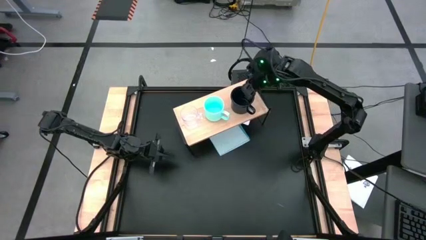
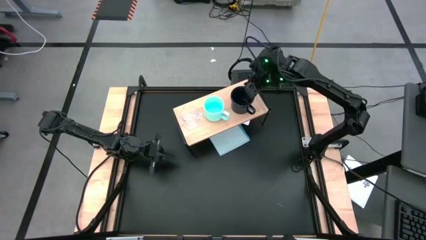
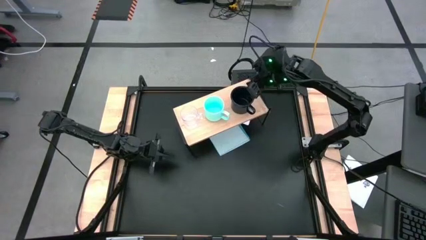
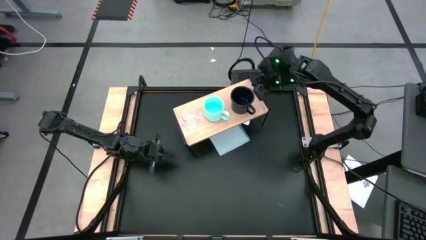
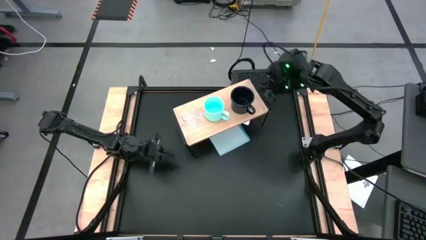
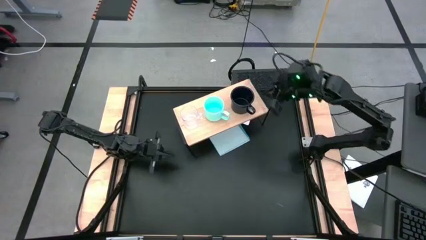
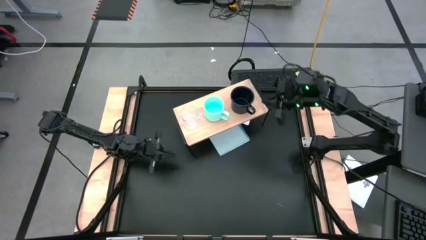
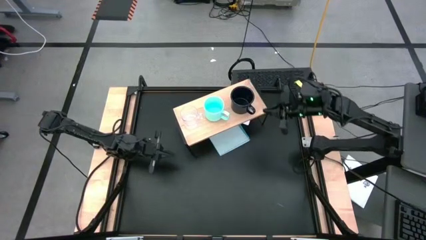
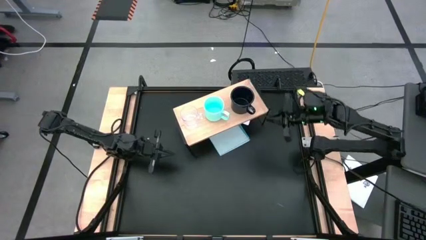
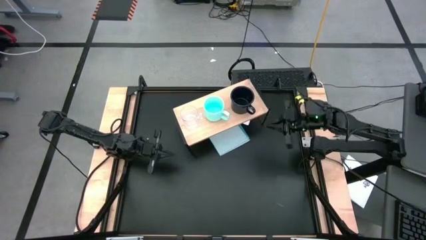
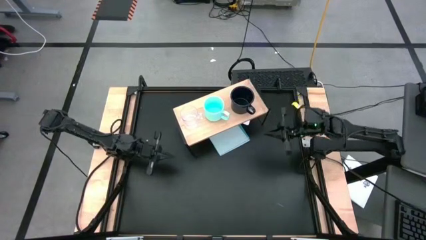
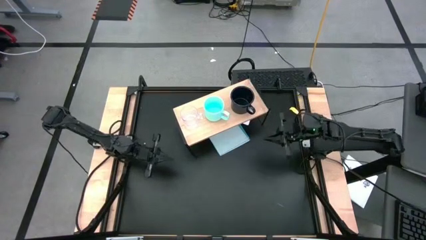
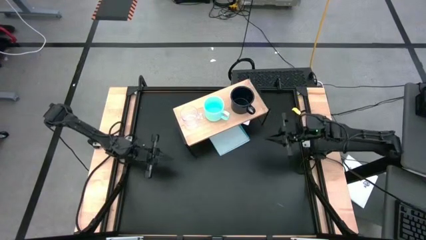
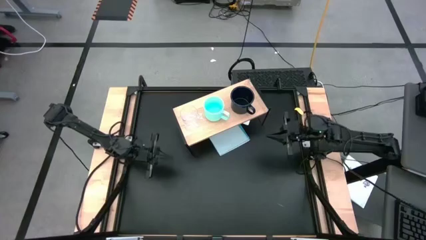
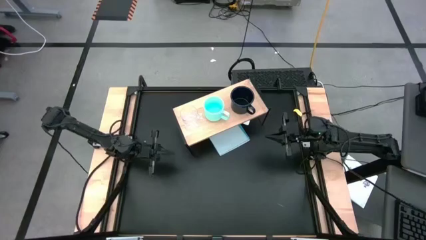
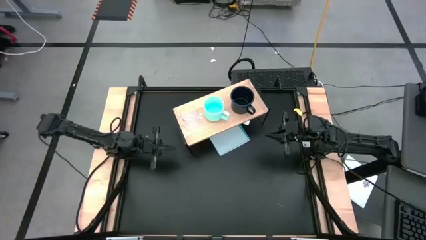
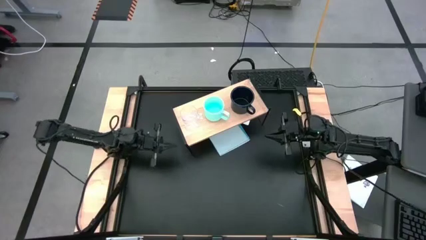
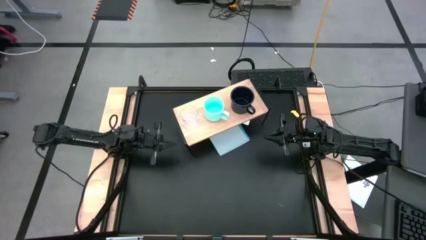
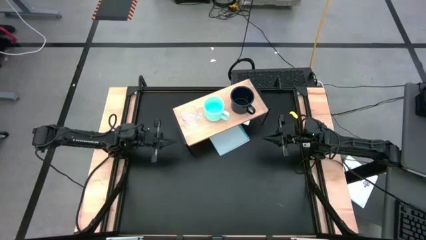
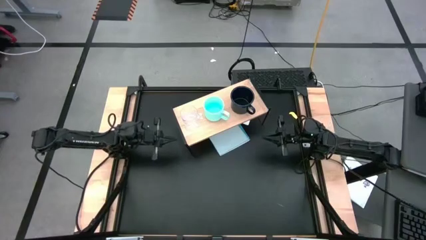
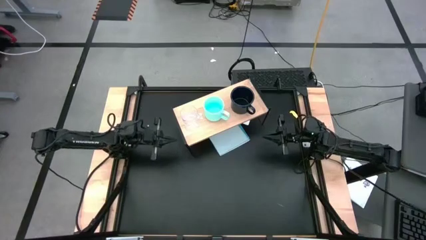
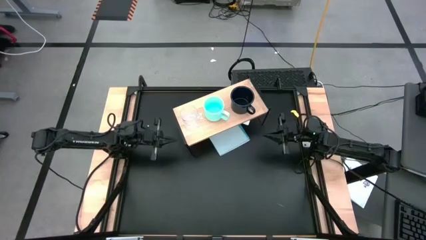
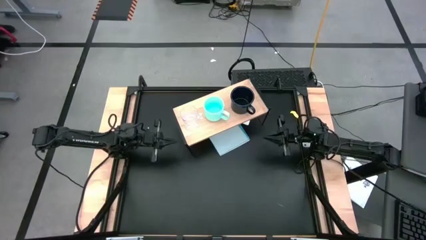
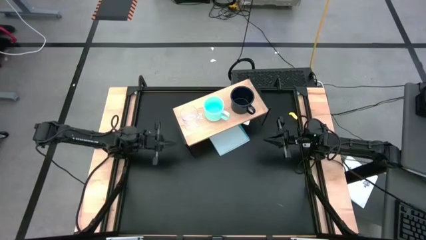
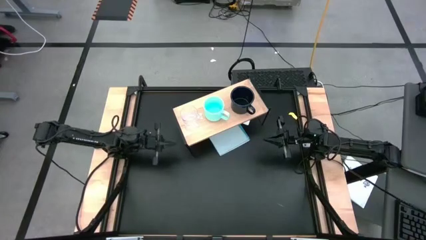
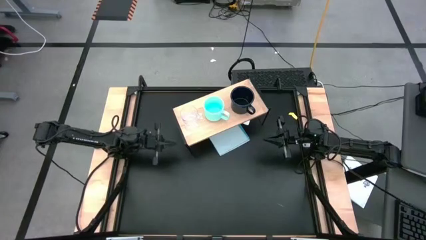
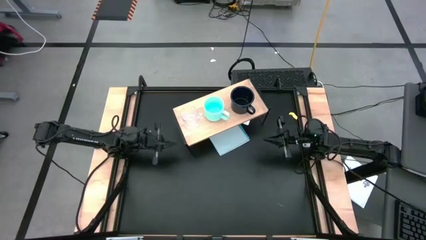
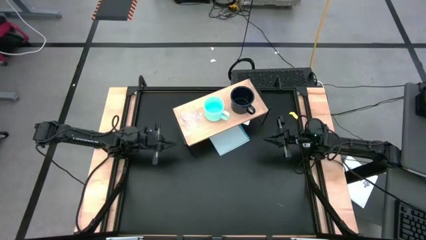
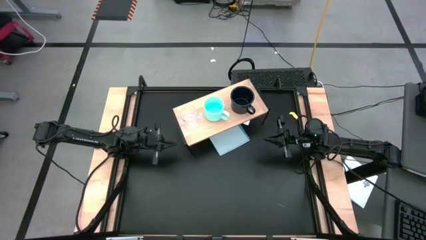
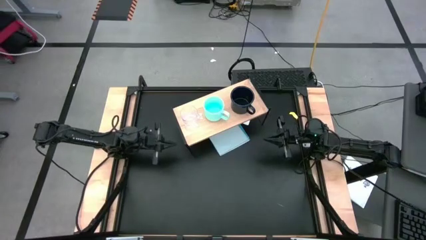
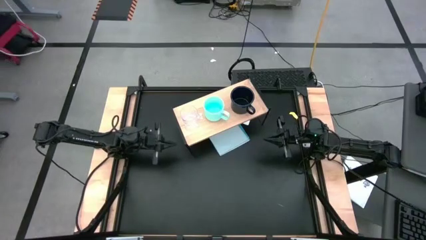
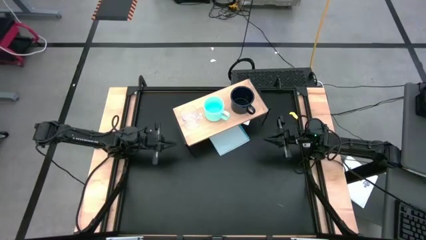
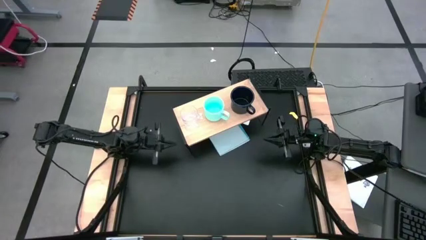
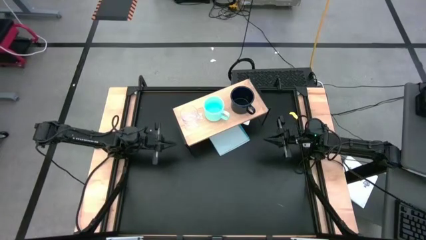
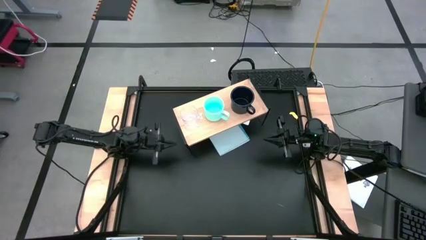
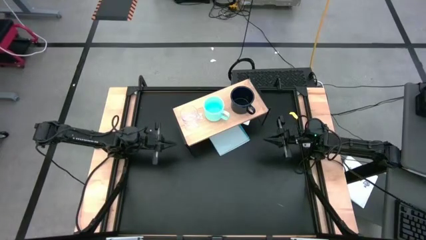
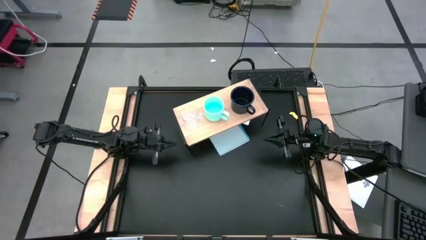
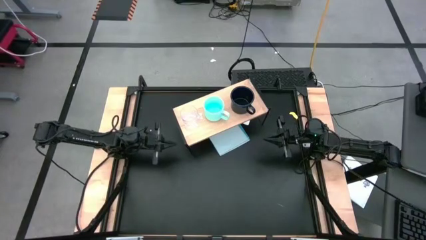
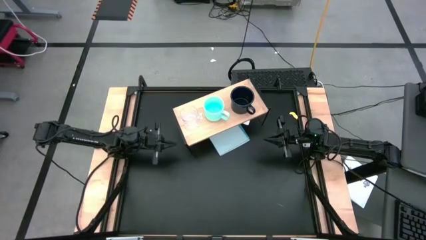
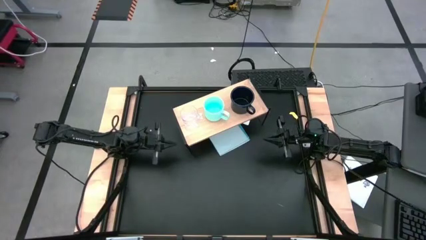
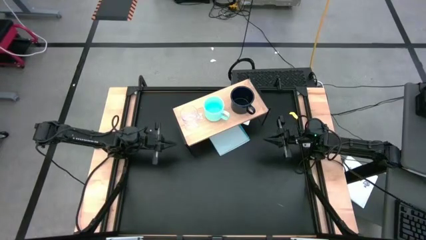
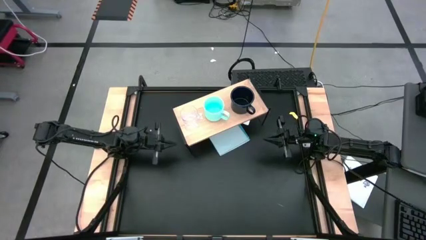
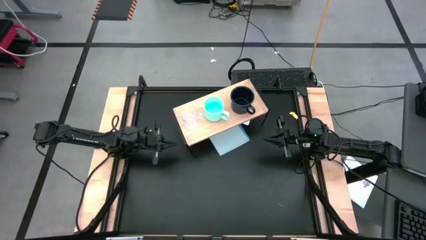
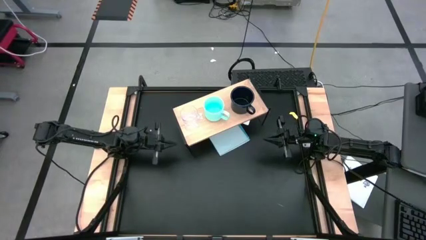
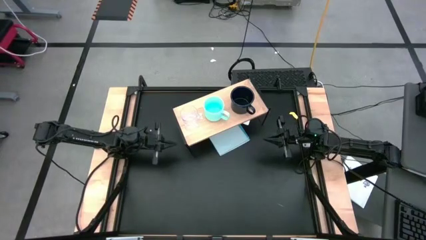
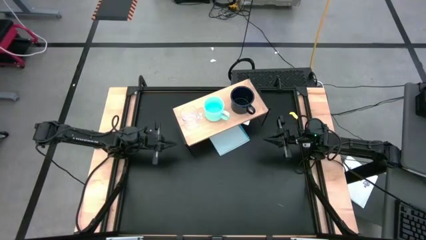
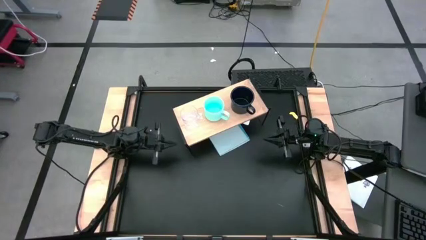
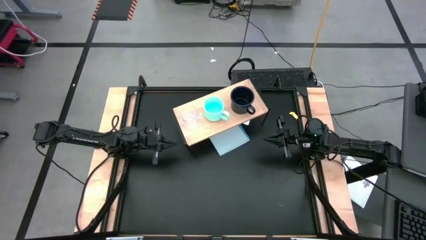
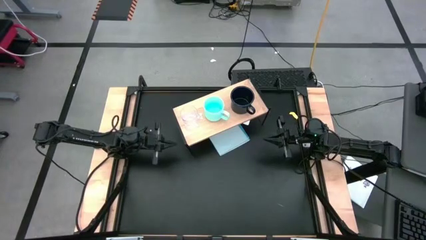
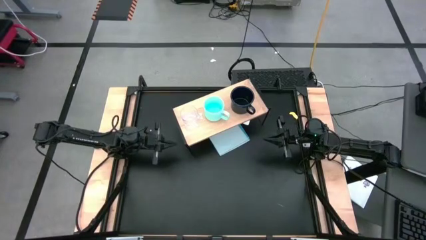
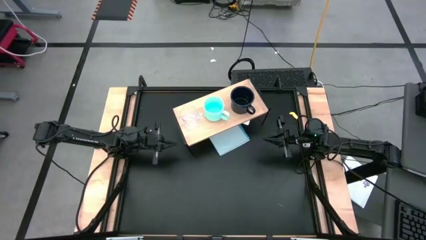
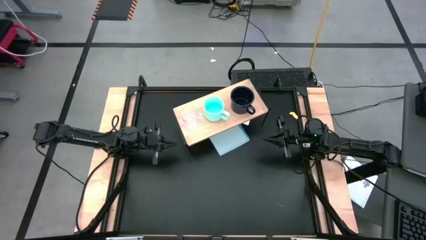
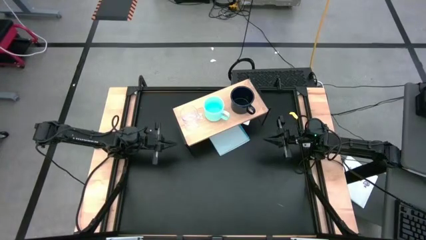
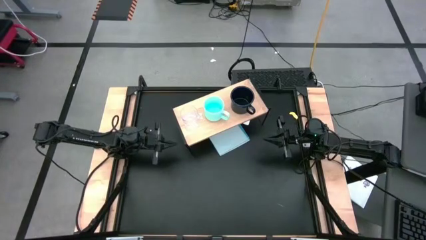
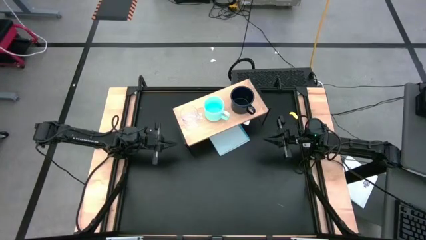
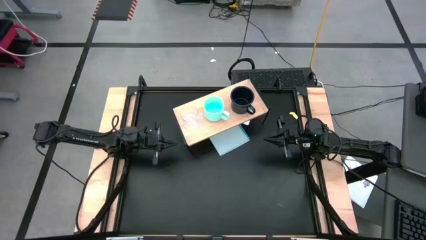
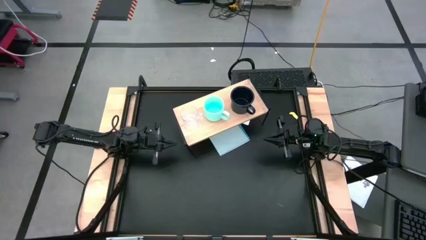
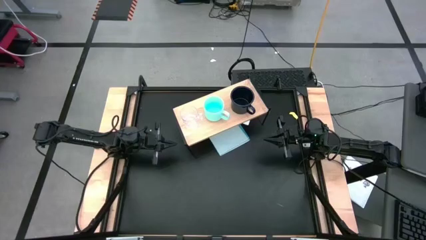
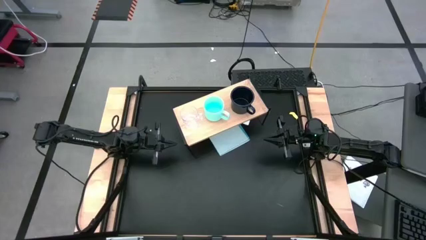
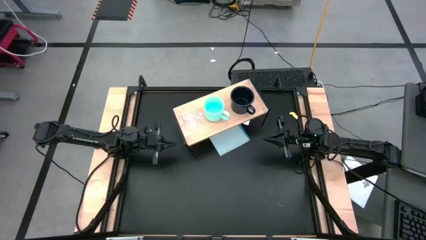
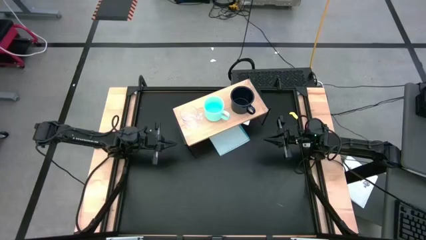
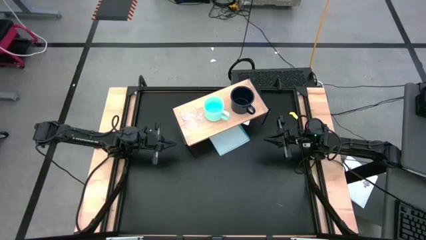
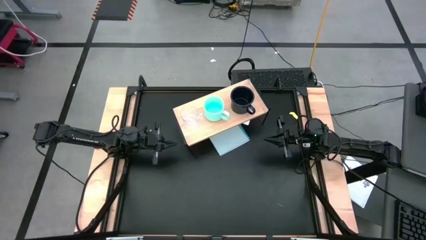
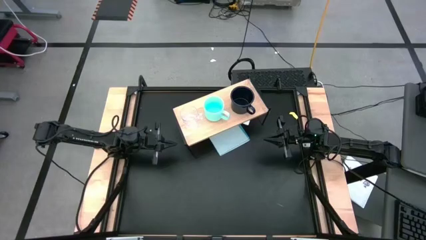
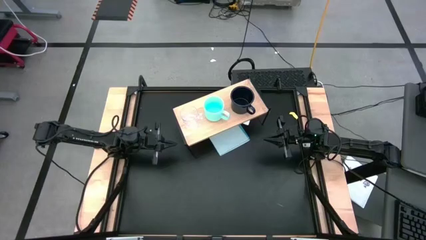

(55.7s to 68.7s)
Task: Stack small to large cups/mugs on shelf
Return to Home Position
